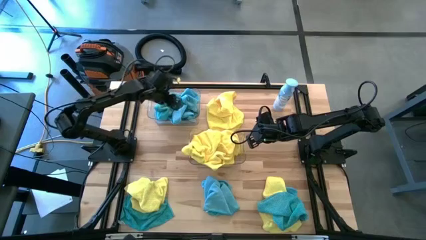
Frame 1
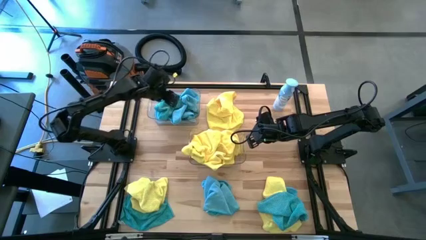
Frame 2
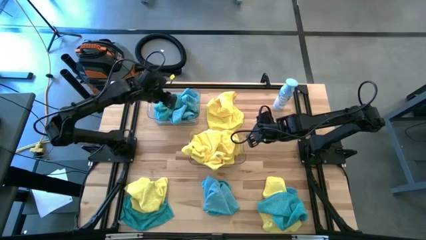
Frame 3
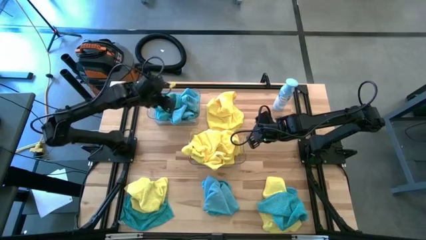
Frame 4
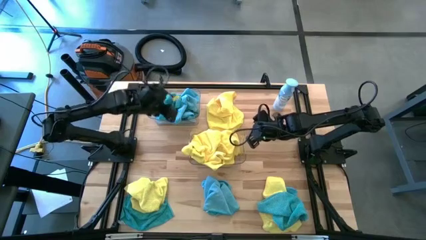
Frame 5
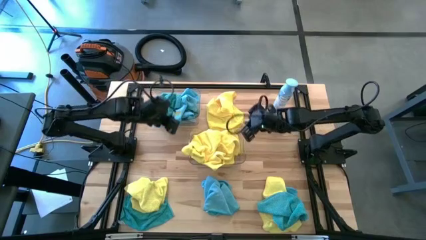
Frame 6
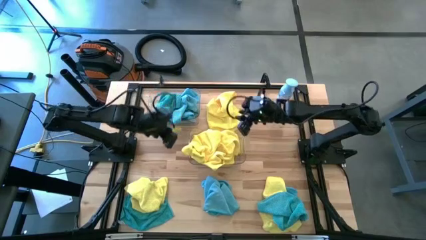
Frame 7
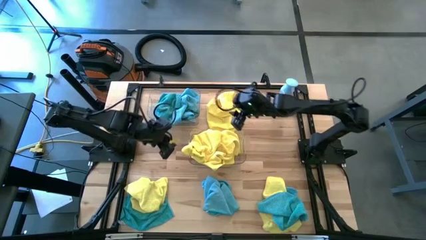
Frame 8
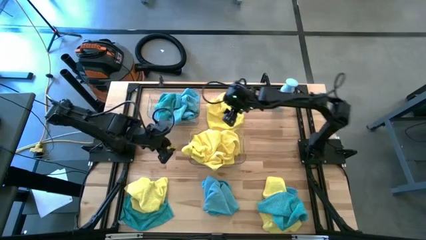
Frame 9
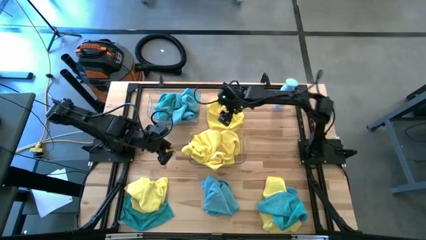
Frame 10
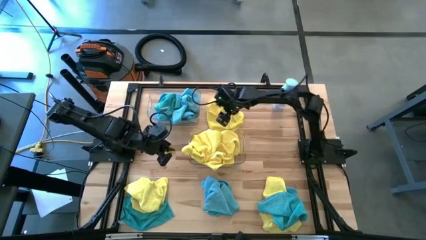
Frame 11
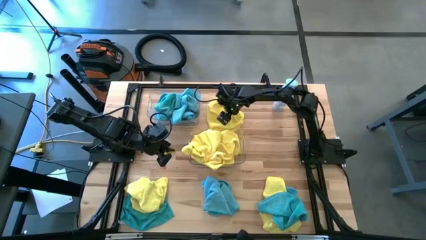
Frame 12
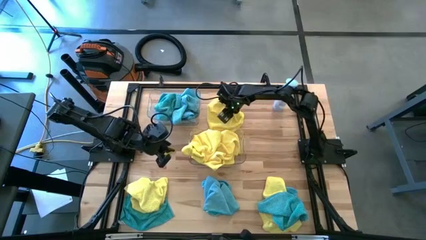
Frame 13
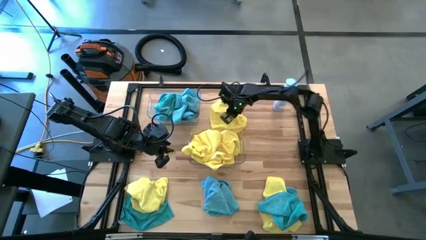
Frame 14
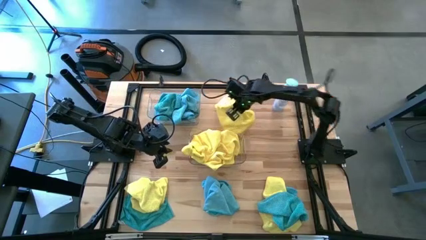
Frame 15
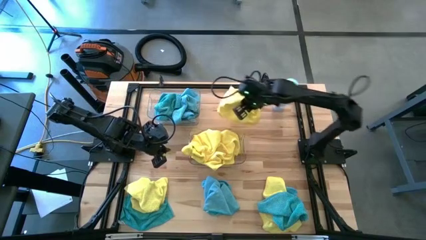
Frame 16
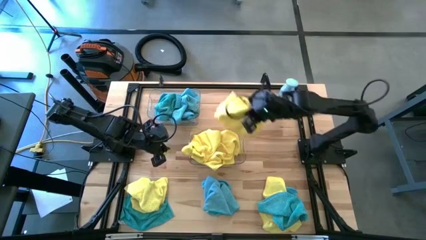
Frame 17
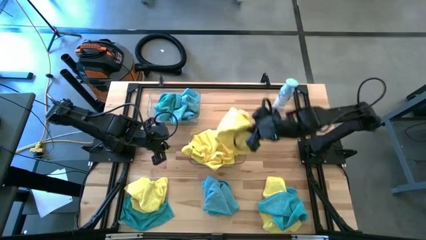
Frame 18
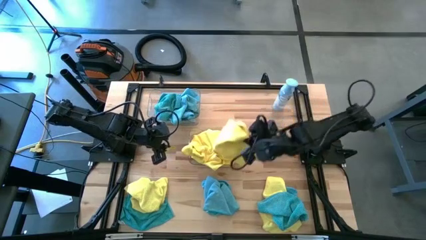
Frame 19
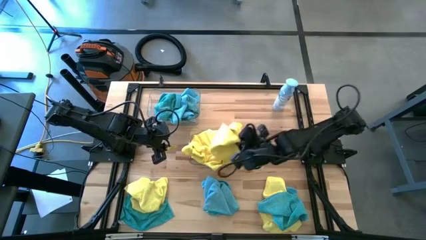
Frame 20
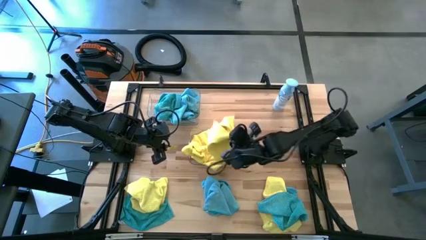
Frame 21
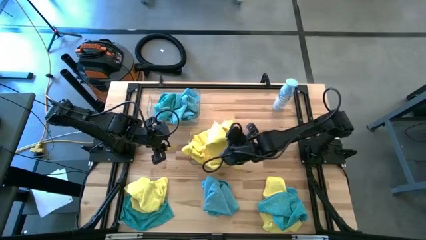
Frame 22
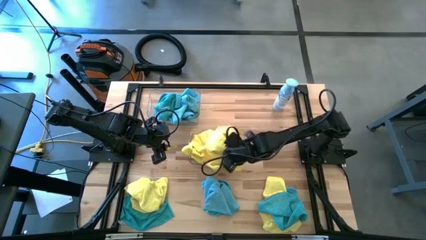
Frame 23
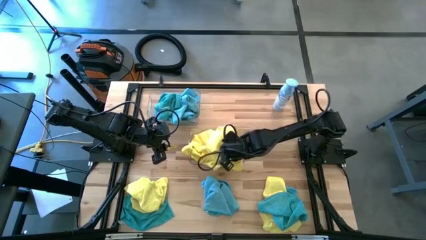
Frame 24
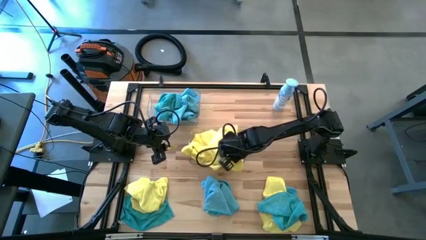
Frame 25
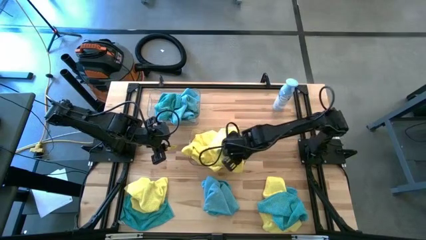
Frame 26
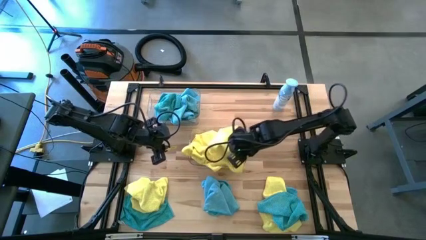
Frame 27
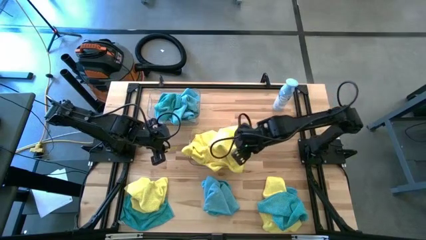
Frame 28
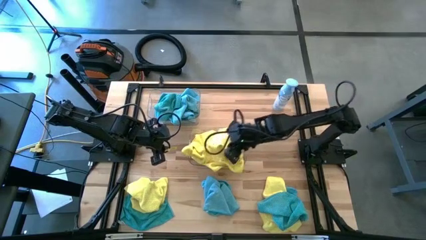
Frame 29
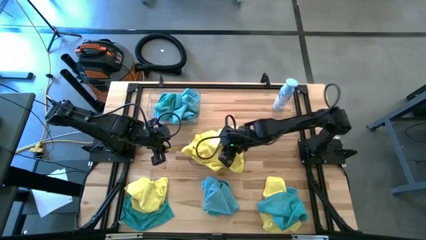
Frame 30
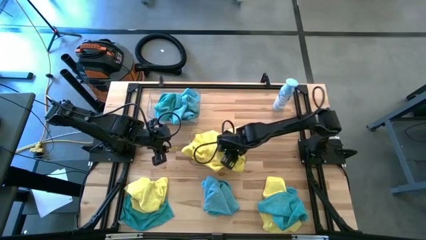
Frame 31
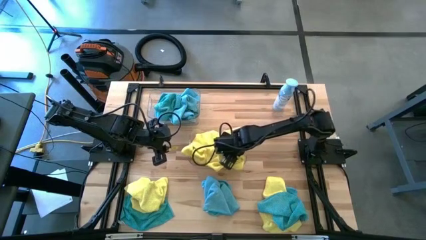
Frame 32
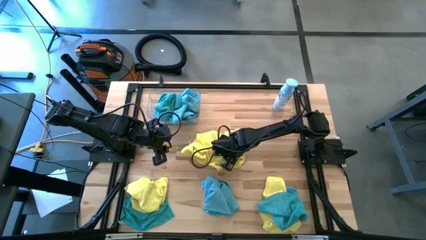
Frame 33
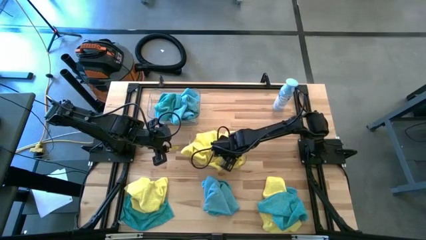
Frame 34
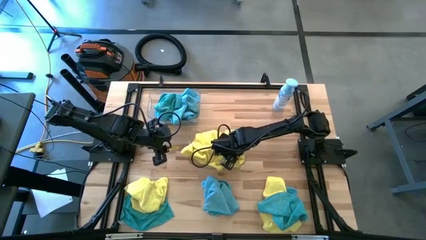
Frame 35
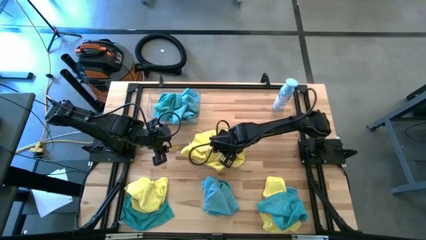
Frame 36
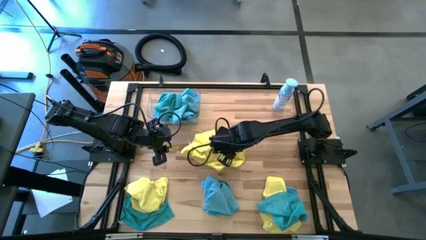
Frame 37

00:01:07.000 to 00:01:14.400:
Task: Sort microfiber towel by color & place in baskets
Put the yellow towel into the bottom transparent bin

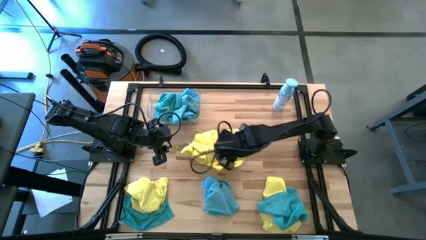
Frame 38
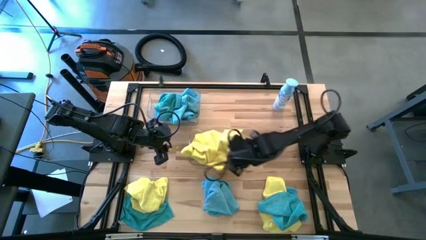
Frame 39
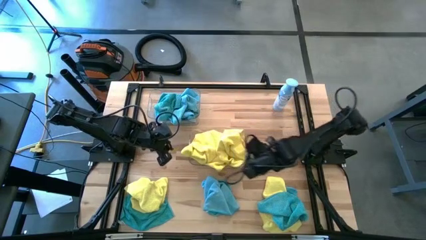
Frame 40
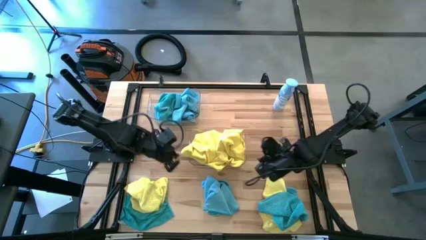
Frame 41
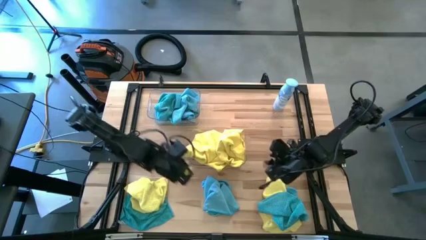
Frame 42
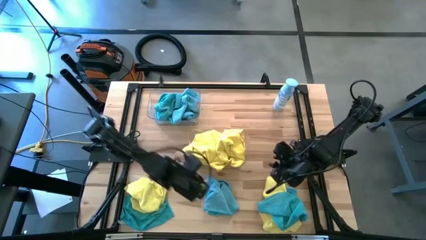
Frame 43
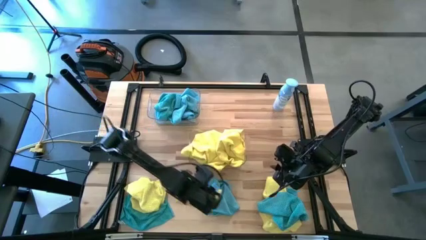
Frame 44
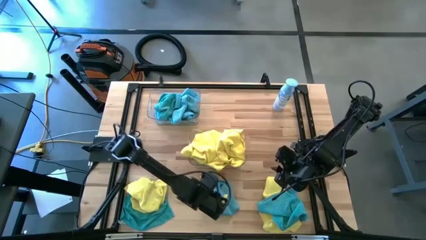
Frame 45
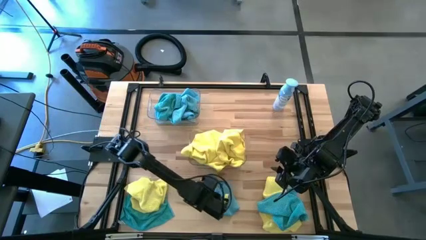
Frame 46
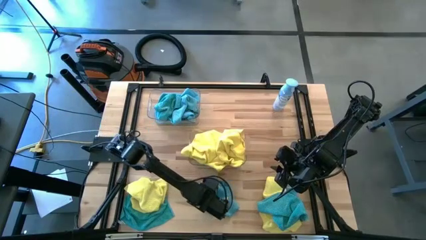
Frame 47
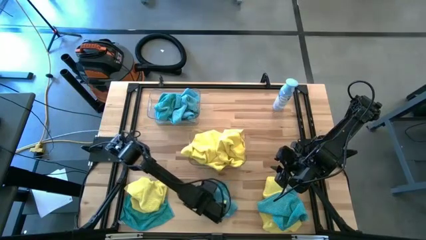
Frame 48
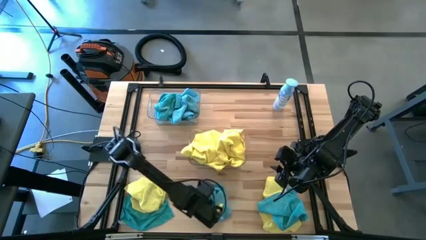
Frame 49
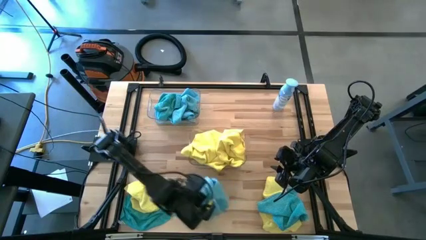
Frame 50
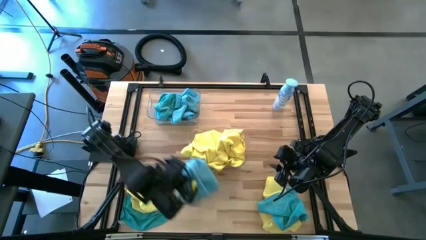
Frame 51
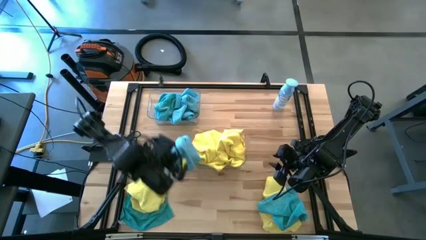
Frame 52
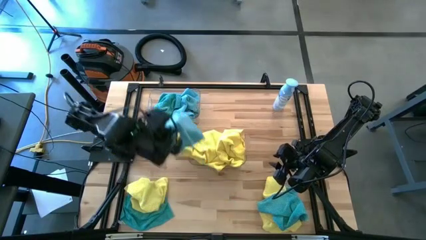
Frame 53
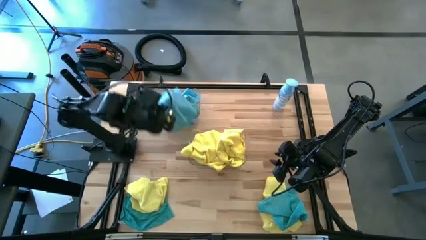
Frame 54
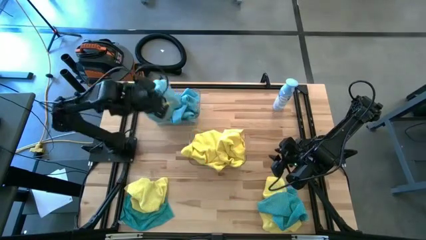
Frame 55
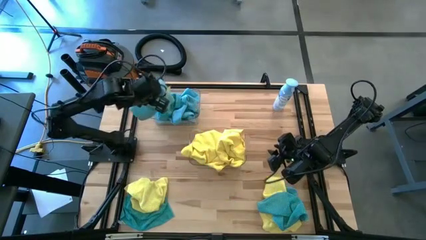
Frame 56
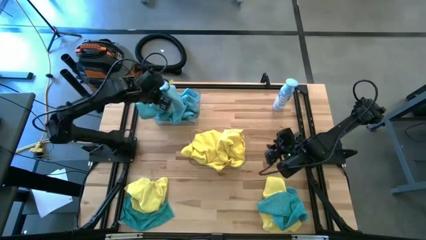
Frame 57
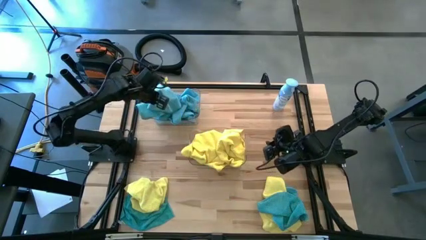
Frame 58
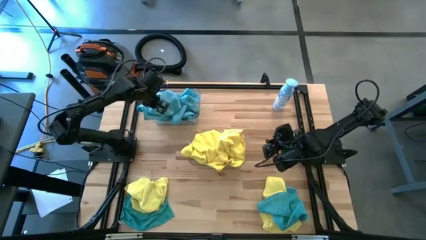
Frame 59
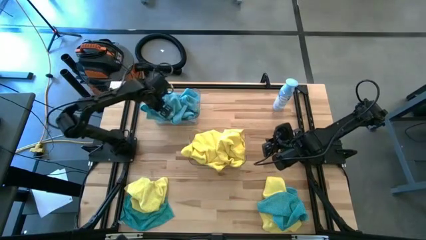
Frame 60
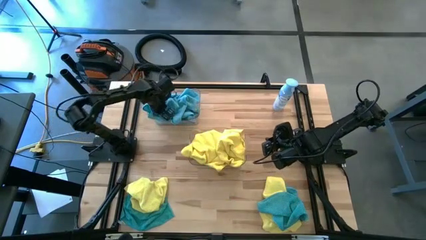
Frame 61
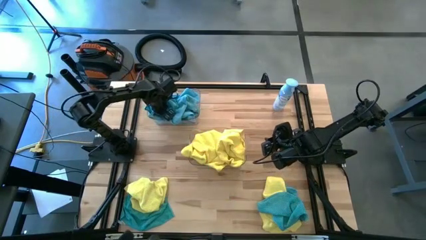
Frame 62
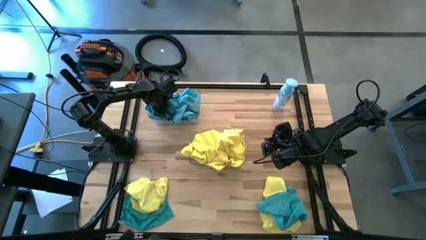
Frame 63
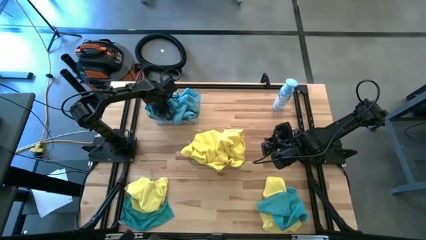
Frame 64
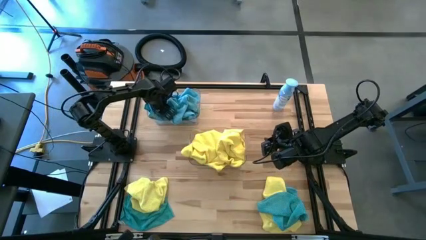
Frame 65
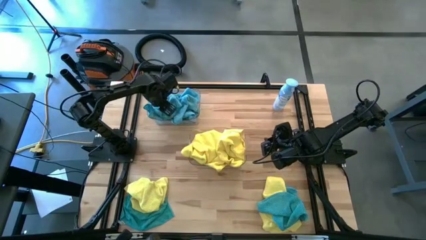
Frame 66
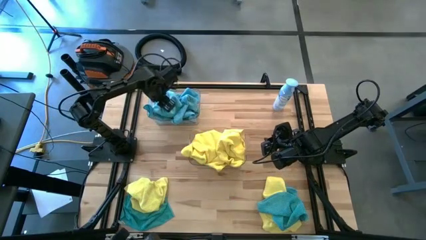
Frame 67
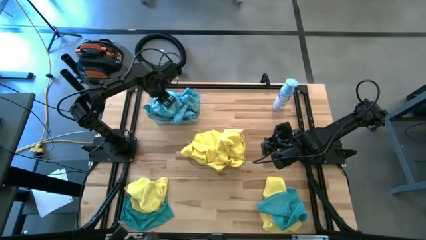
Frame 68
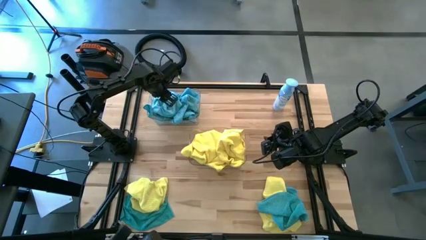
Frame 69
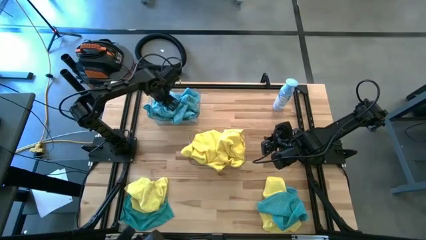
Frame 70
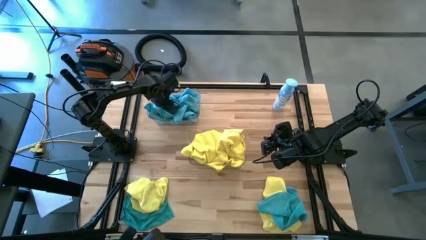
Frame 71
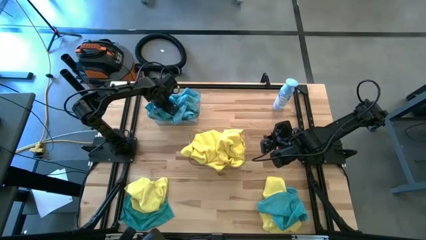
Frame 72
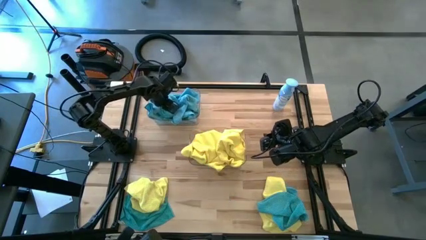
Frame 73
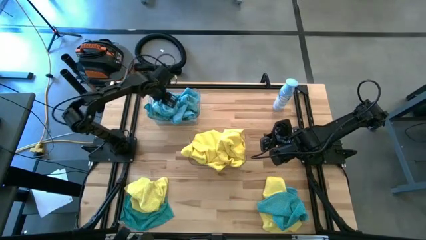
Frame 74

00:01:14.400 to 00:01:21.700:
Put the blue towel into the top transparent bin
